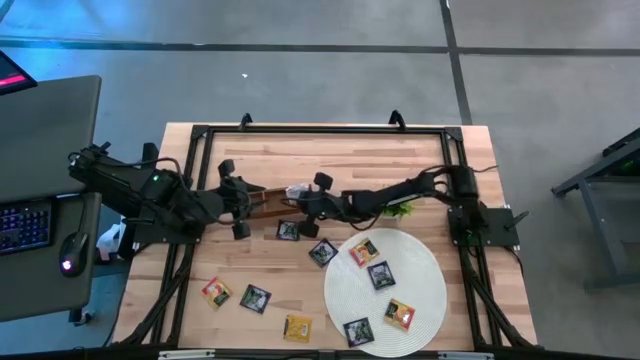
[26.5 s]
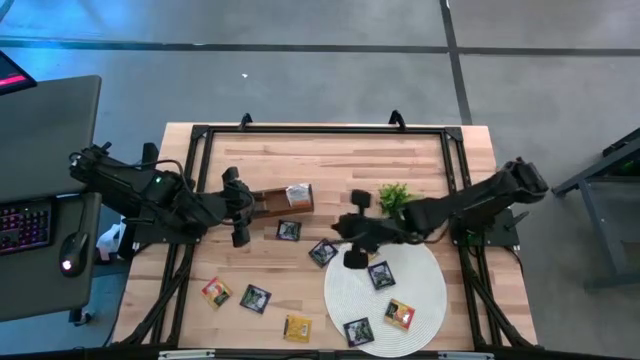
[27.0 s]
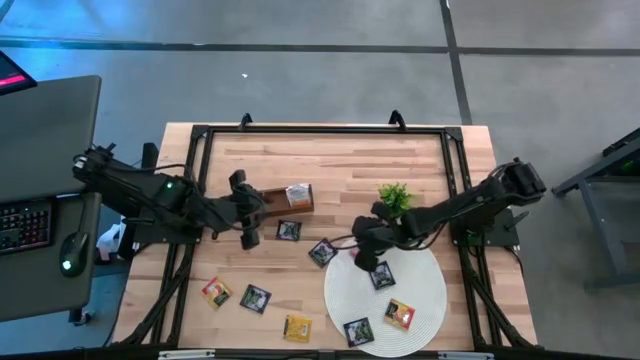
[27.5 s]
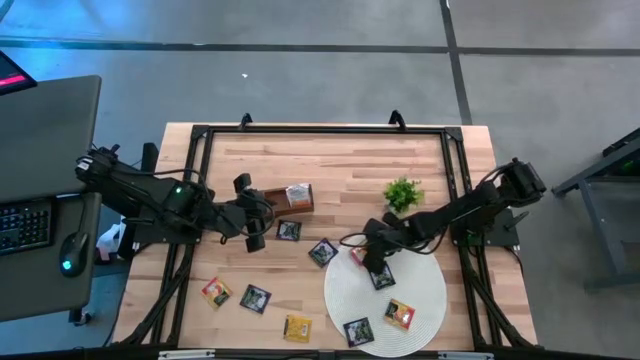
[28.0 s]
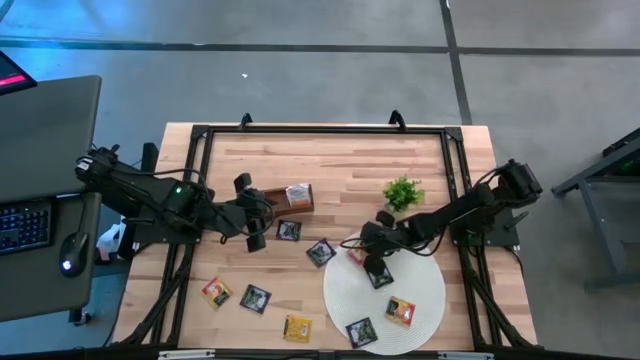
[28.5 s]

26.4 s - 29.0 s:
Task: Pick & Place Tea
Put the yellow tea bag into the middle section of the wooden organizer

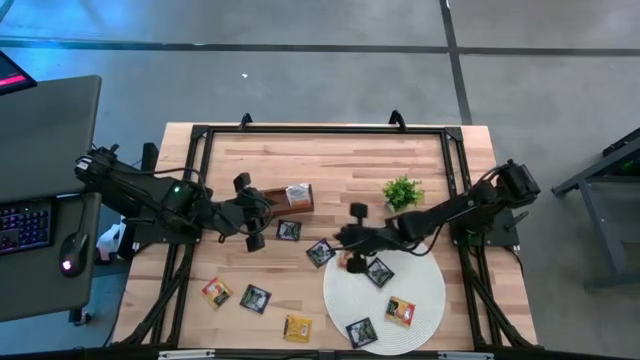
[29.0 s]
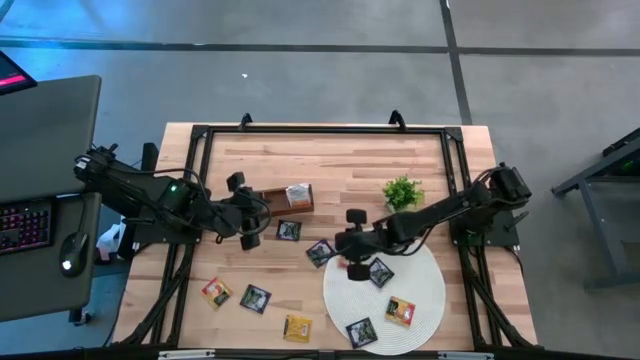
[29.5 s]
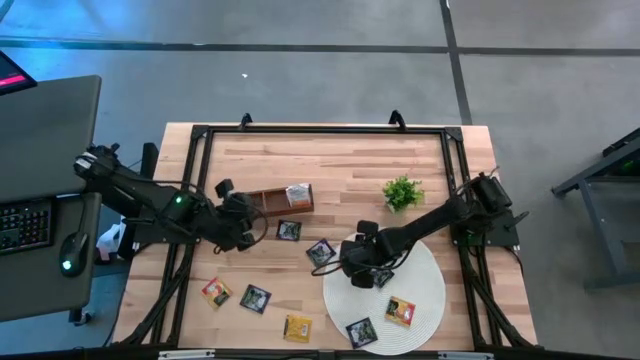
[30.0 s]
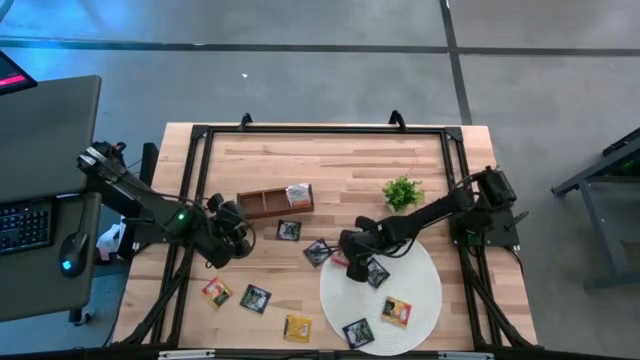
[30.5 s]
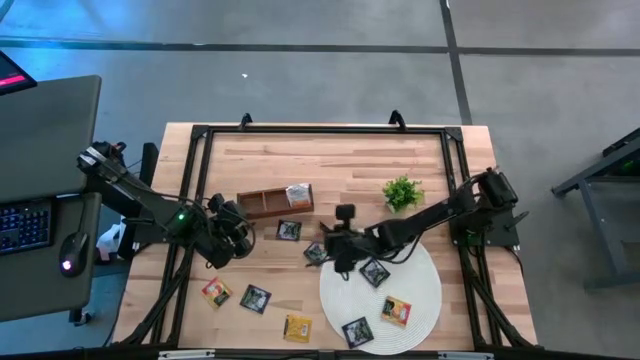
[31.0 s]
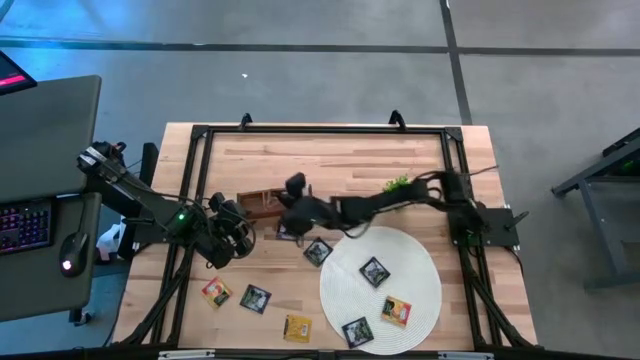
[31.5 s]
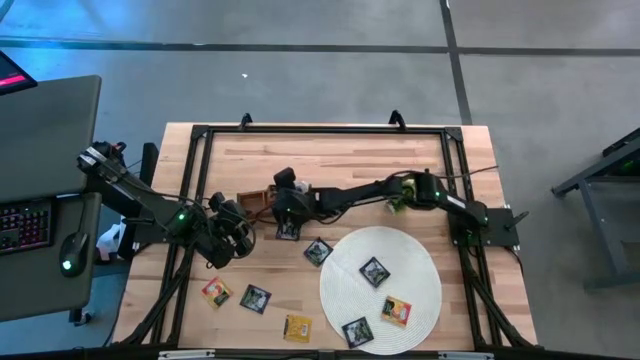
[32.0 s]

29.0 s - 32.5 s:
Put the yellow tea bag into the middle section of the wooden organizer

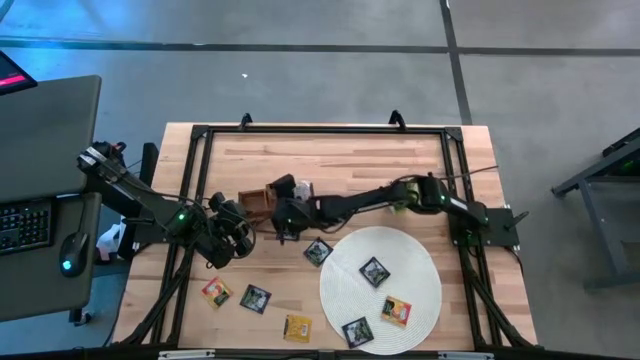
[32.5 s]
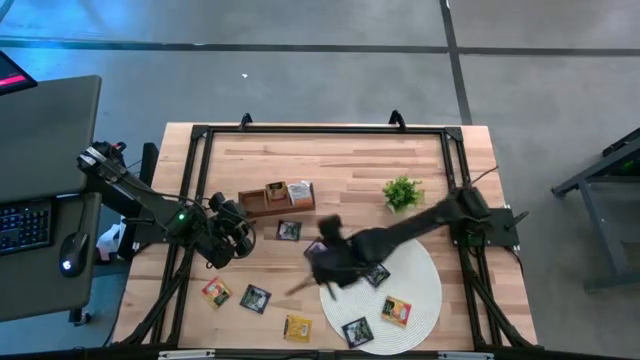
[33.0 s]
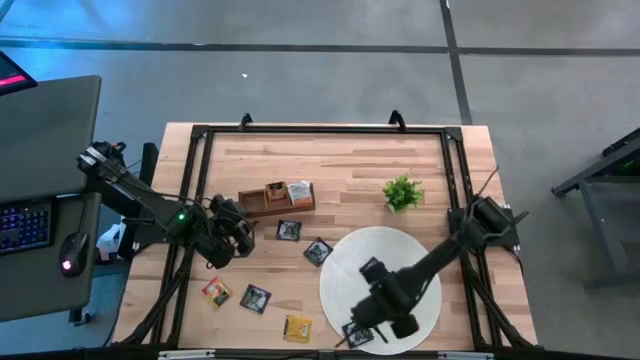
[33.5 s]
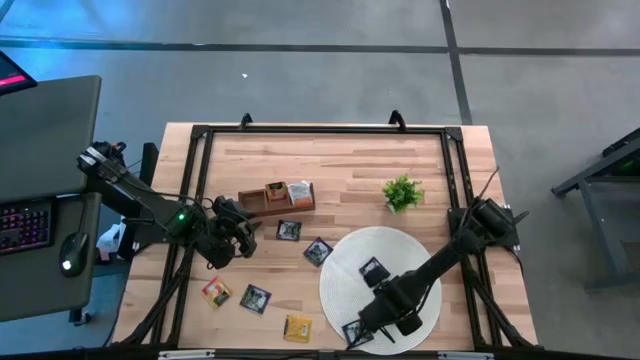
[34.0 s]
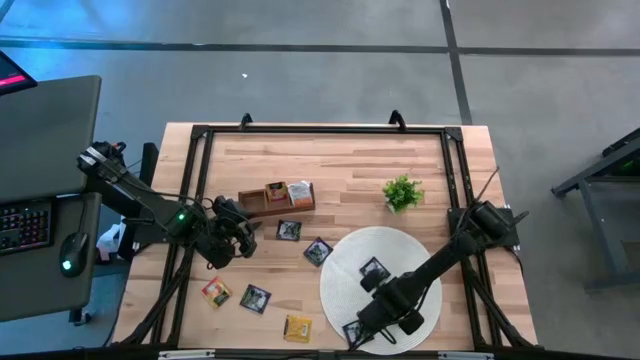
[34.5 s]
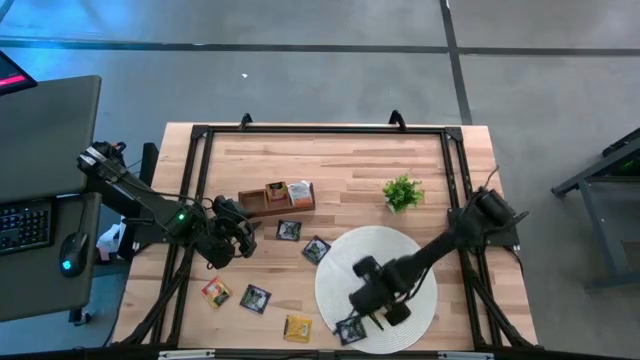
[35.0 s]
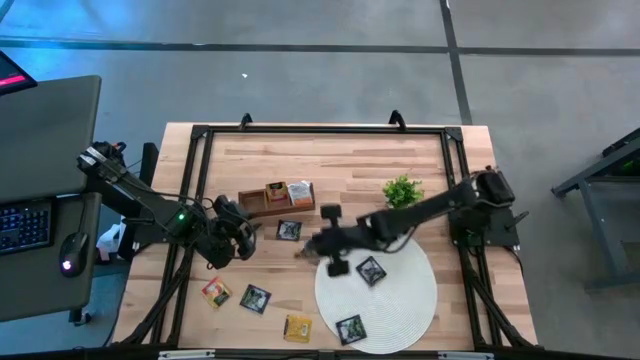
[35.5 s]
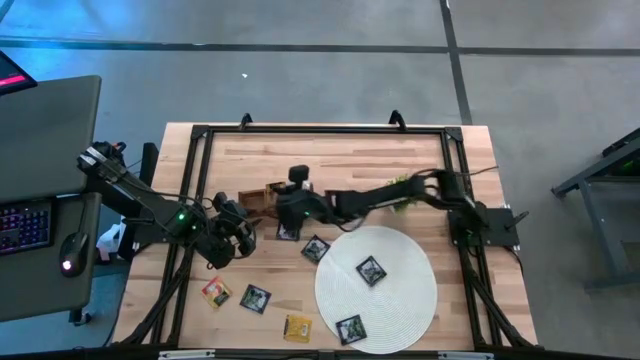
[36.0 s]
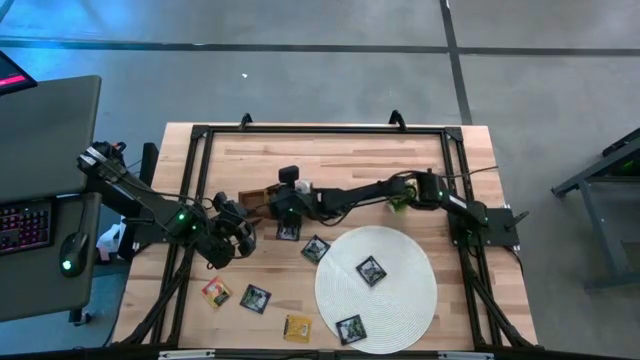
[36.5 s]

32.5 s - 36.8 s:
Put the yellow tea bag into the middle section of the wooden organizer

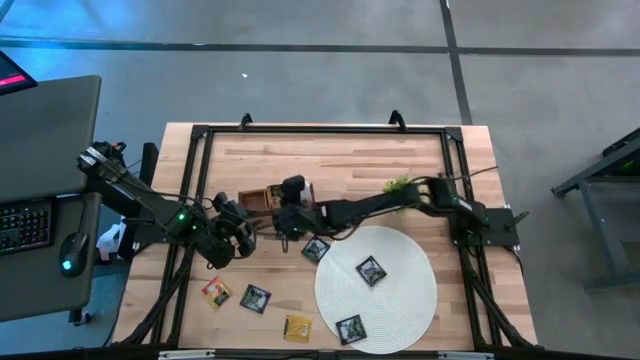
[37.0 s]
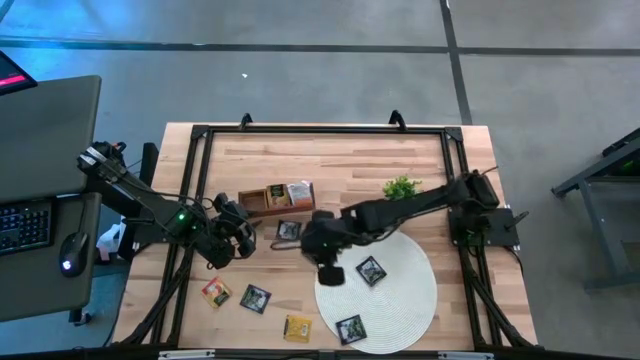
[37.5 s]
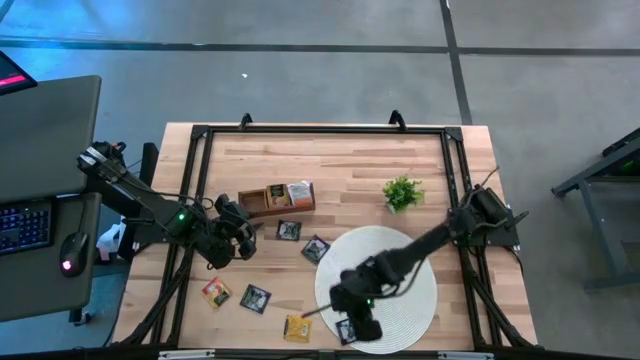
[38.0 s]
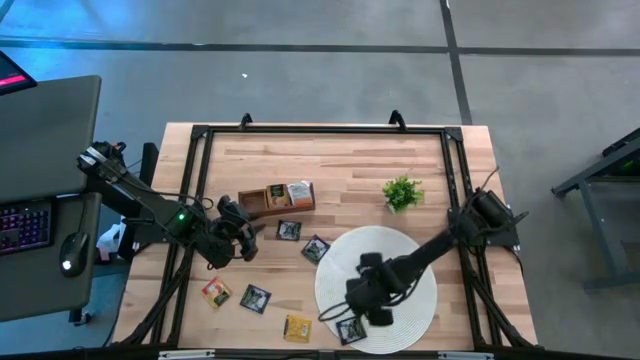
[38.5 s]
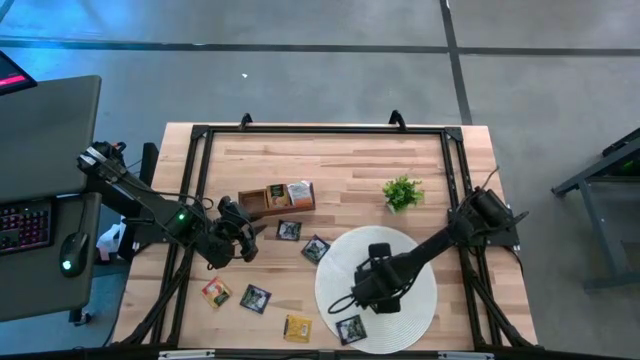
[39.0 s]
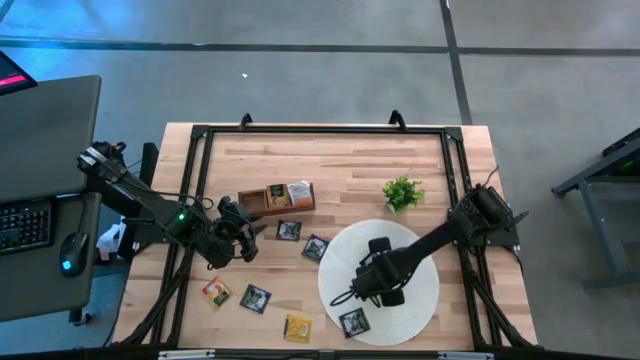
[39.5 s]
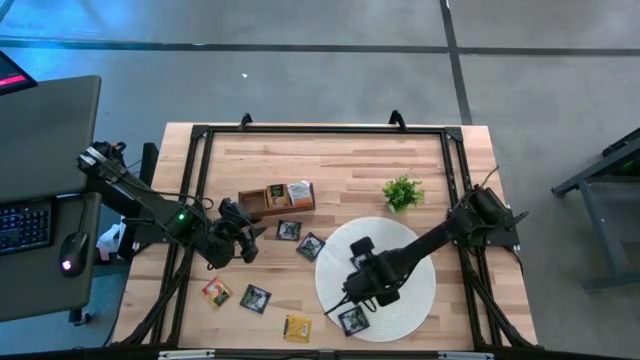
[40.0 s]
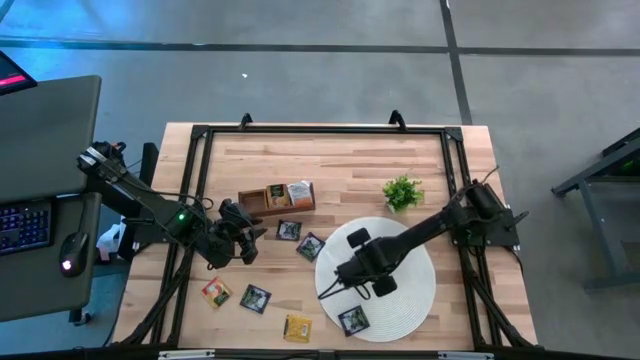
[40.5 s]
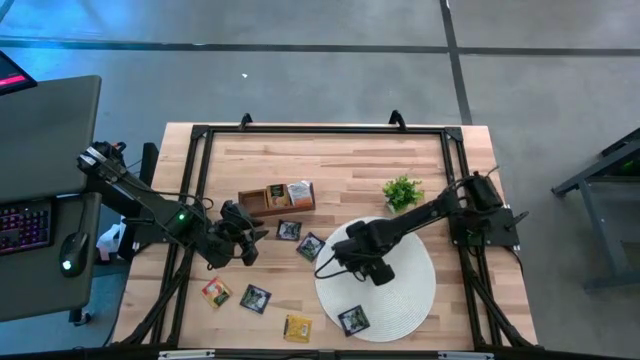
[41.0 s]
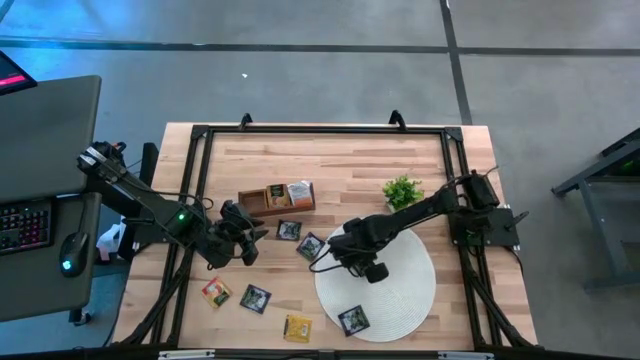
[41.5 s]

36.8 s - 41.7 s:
Put the violet tea bag into the left section of the wooden organizer

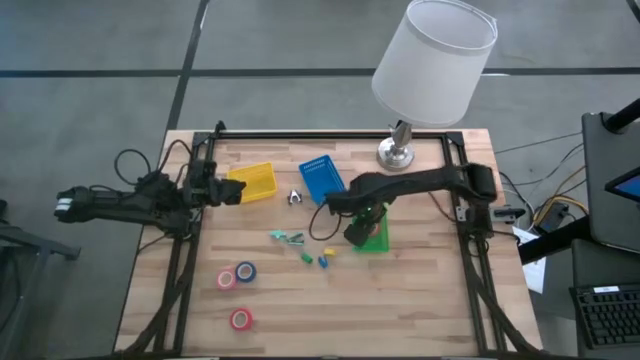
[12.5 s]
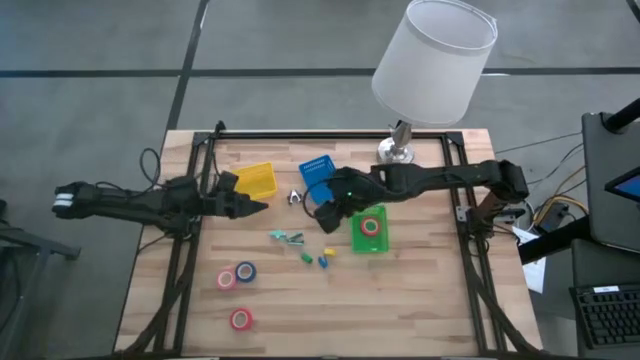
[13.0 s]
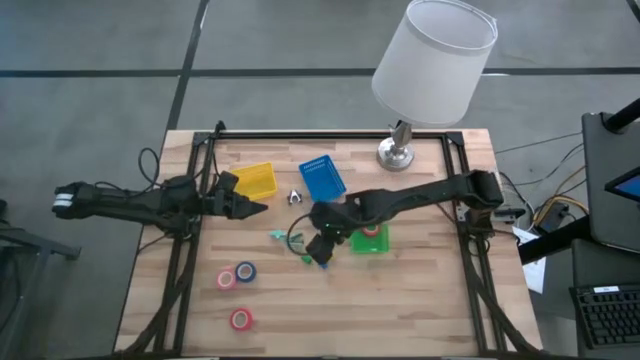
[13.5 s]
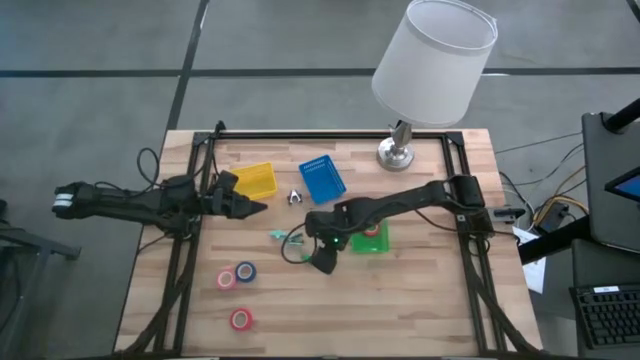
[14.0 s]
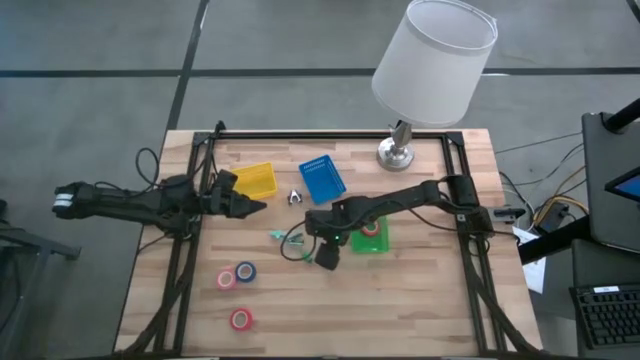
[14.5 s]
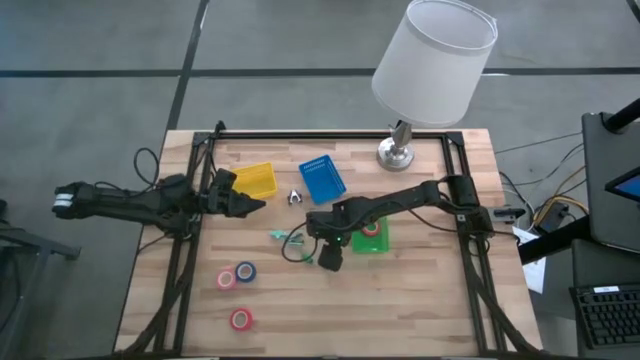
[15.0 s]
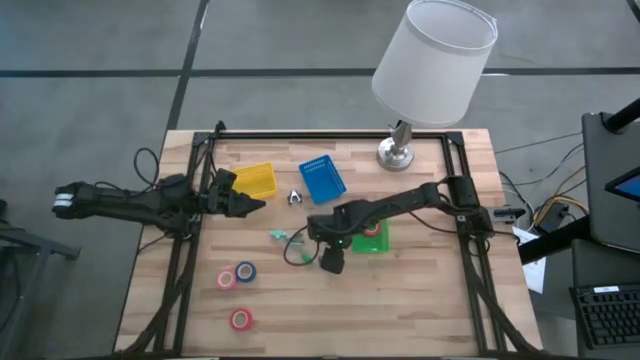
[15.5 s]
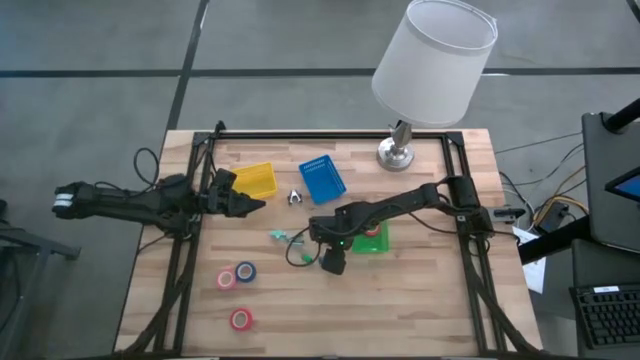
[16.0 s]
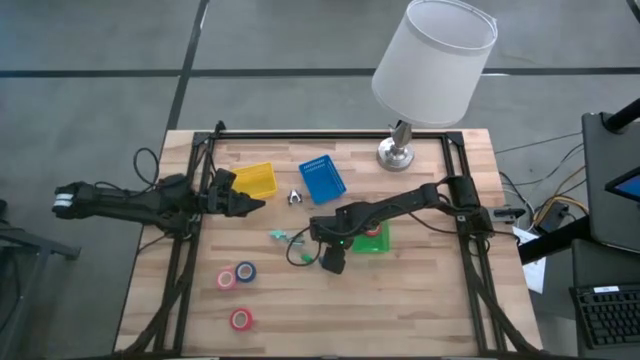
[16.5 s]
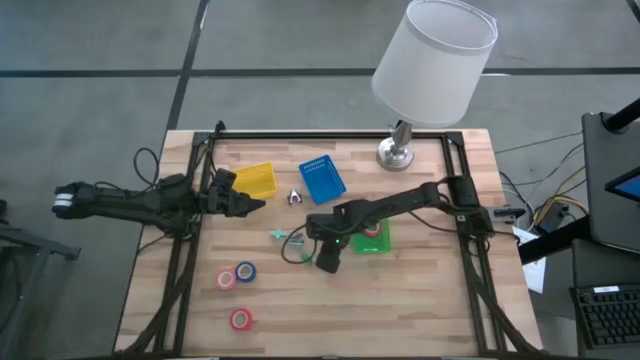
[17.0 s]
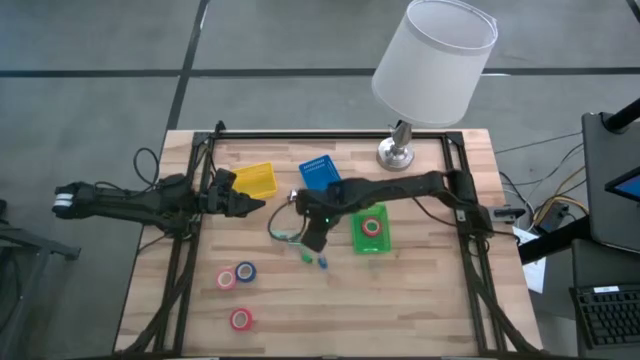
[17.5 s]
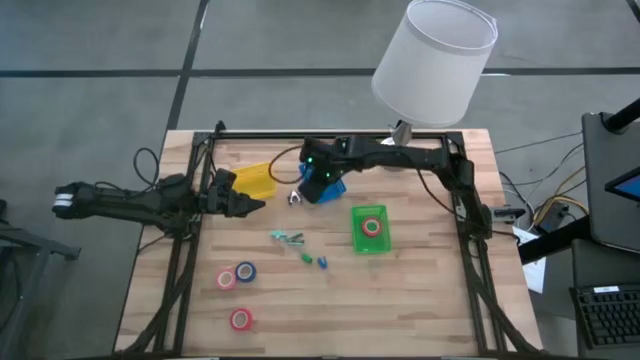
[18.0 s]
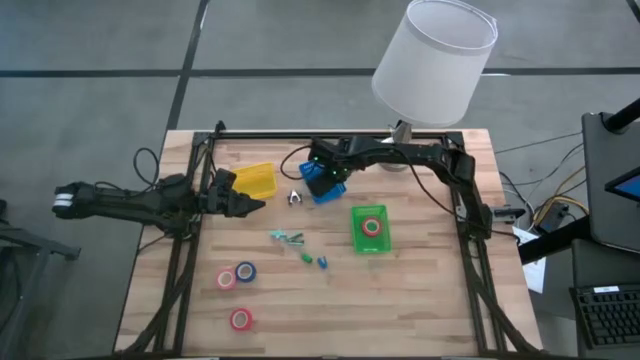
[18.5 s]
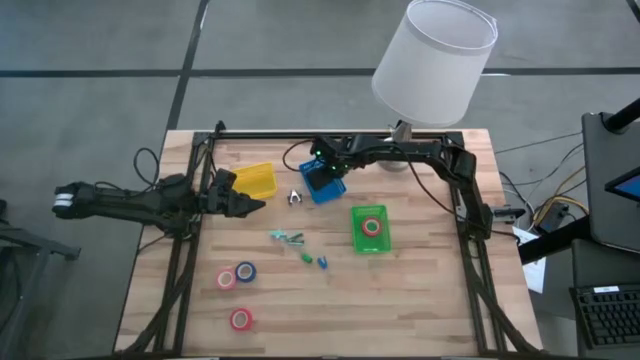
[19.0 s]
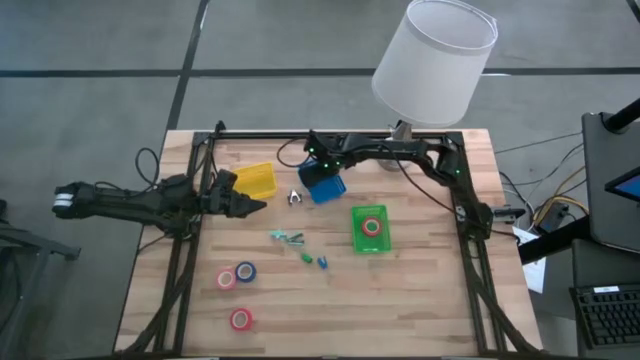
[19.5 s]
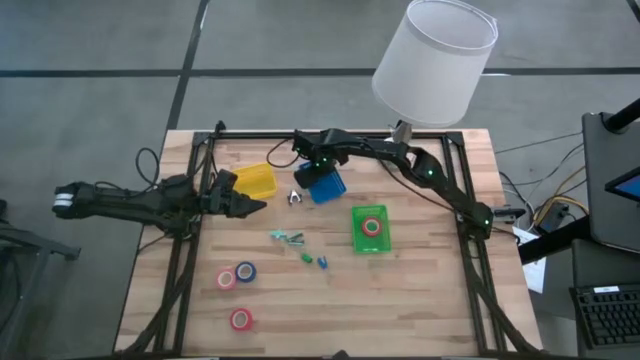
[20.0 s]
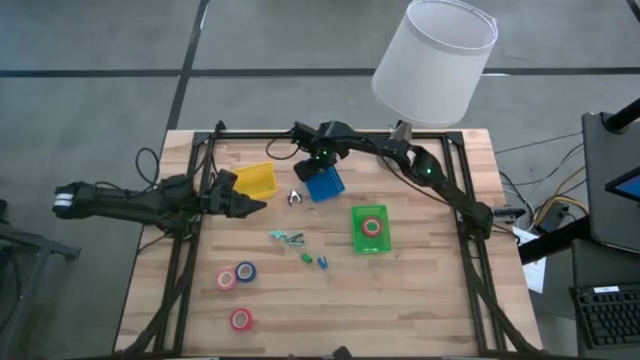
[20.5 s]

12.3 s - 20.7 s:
Task: Pick and place Stapler, Stapler remover, tape
Put the yellow stapler into the blue bin
